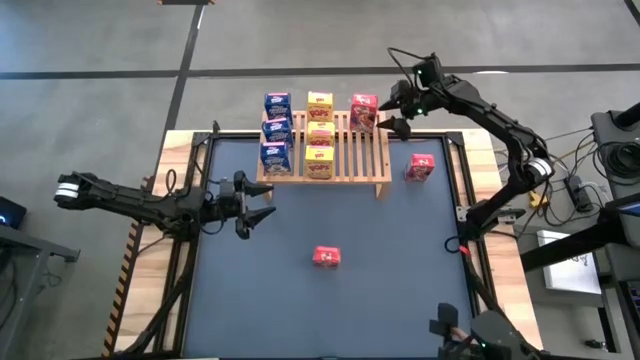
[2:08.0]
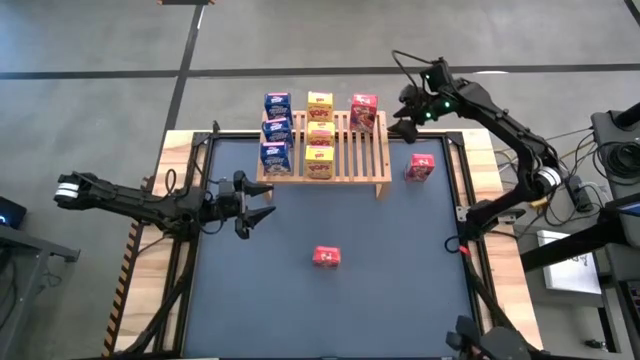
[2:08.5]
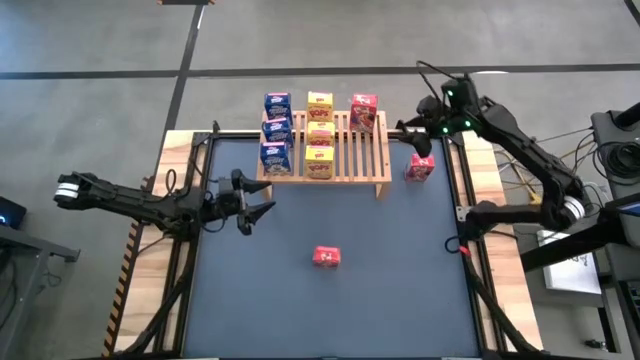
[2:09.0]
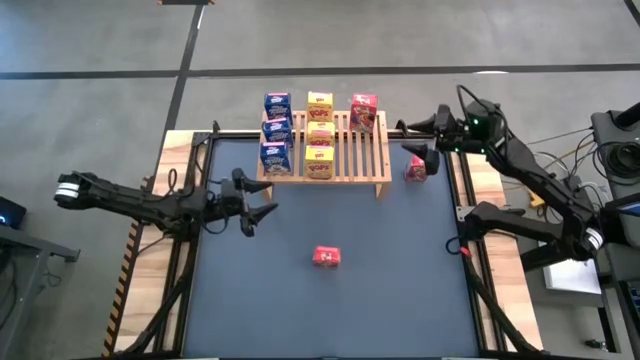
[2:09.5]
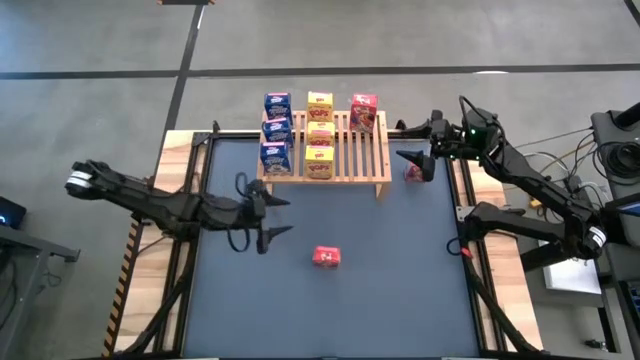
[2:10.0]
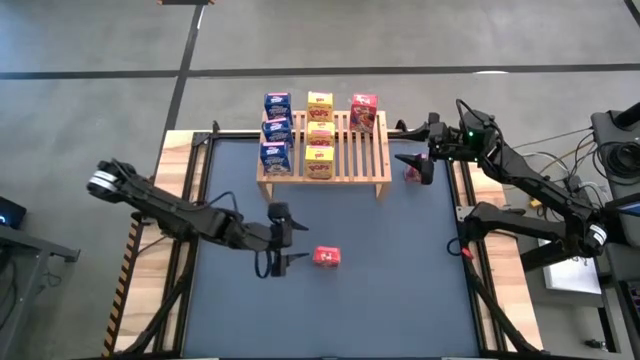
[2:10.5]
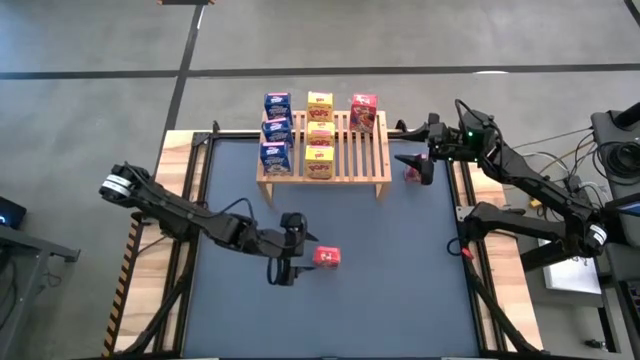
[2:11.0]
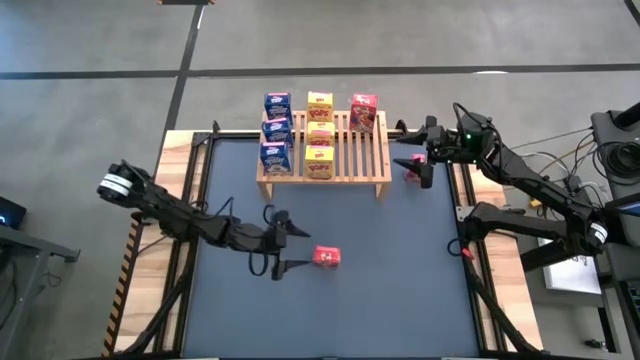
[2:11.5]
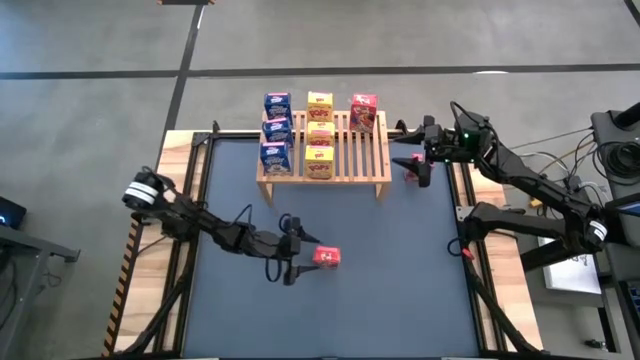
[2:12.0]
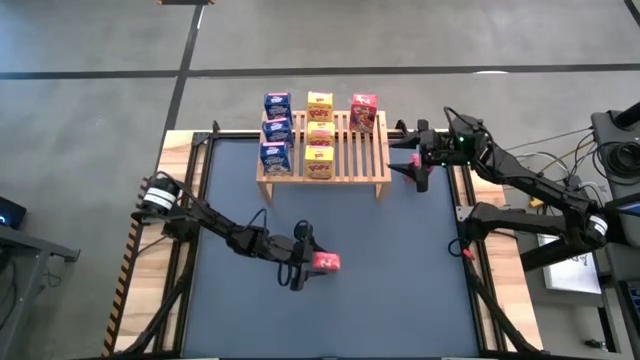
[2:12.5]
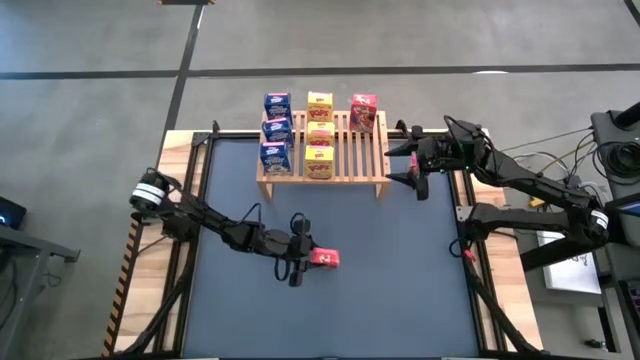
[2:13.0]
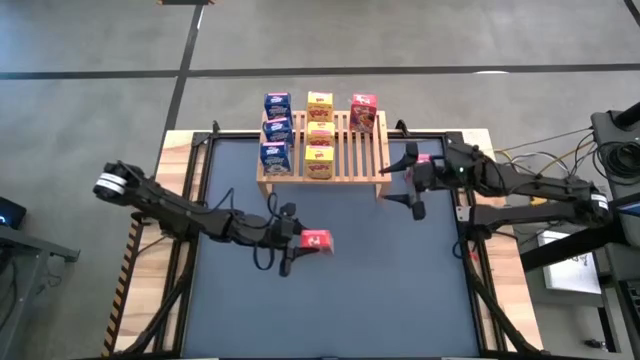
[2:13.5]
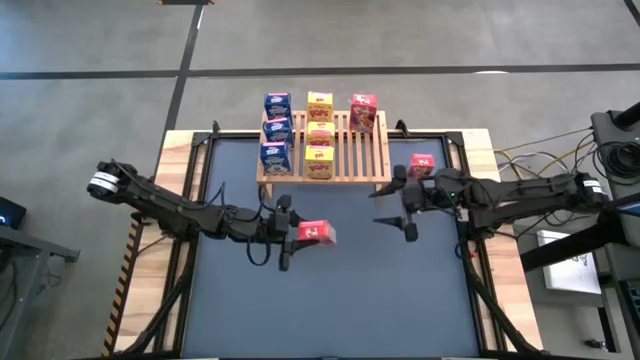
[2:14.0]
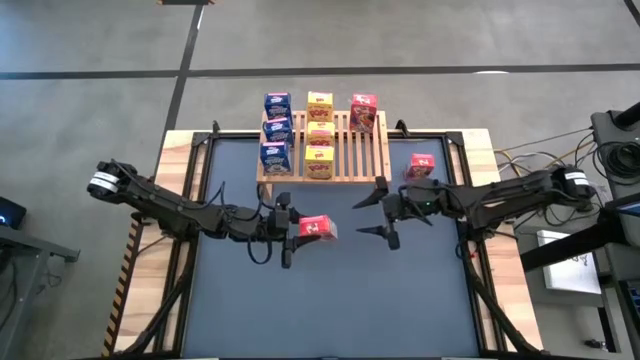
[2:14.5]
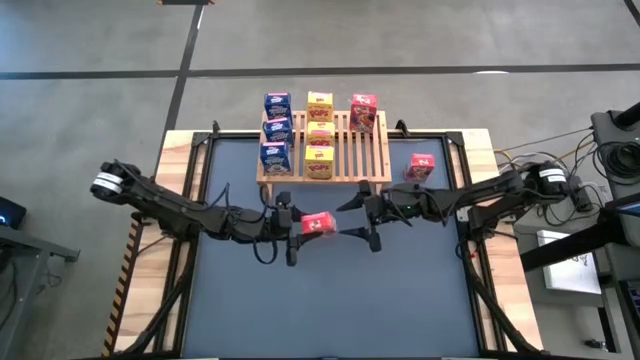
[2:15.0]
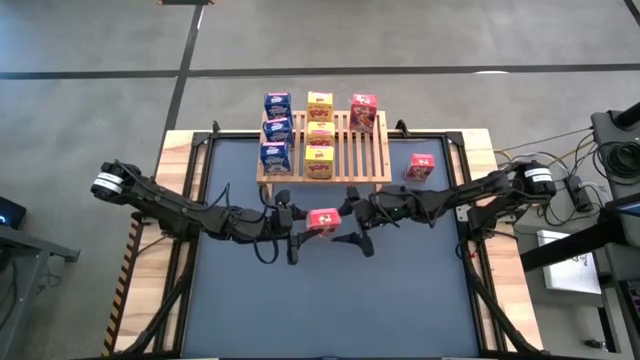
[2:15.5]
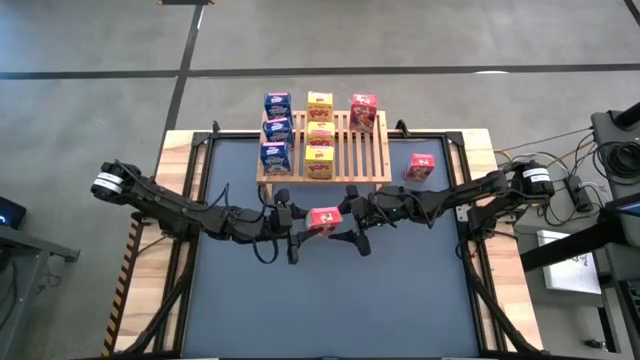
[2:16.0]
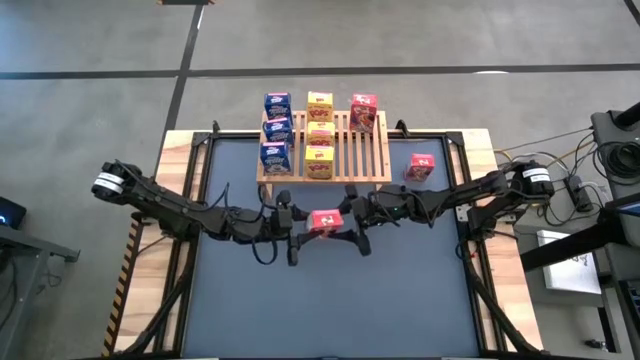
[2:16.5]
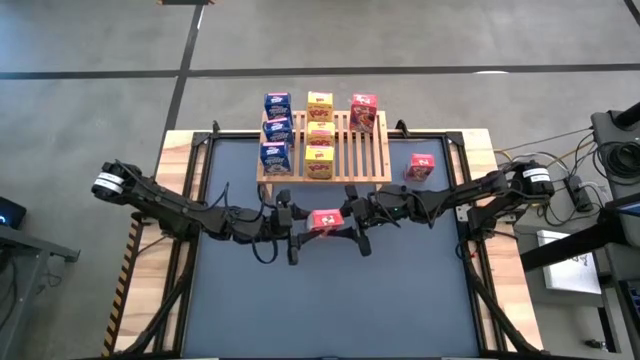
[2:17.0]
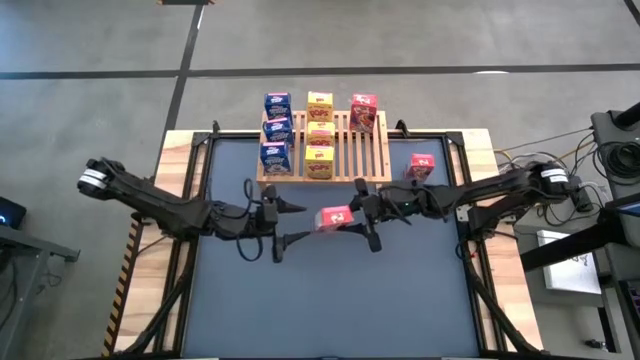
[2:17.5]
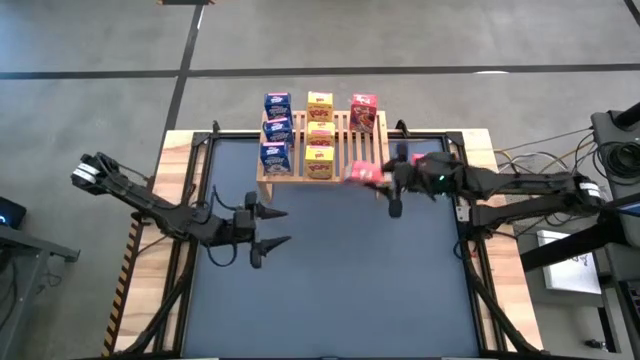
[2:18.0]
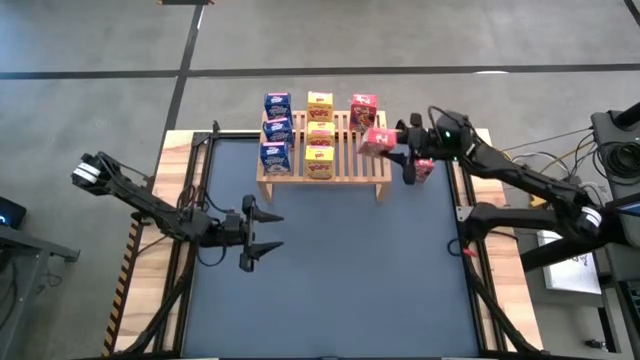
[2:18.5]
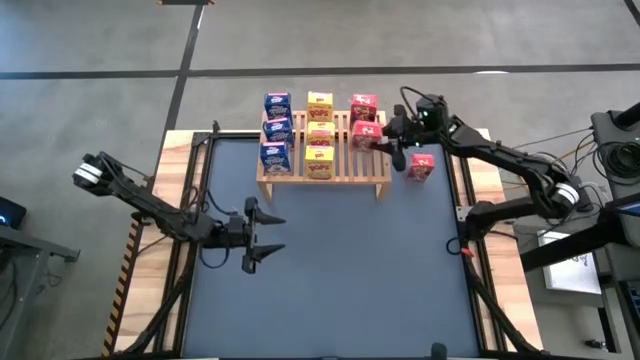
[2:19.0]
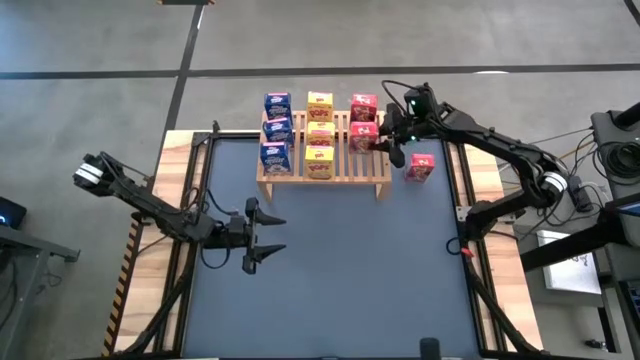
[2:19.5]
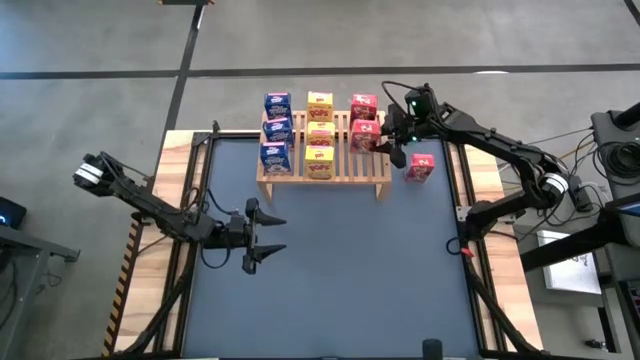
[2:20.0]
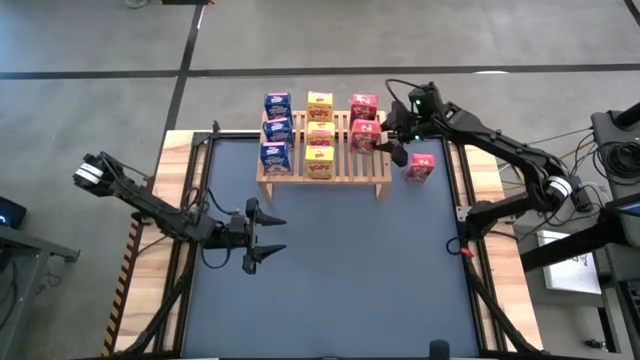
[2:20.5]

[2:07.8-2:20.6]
Task: Stack cereal on shelf
Put the bottom red cereal box on the shelf aligned with the other red cereal box

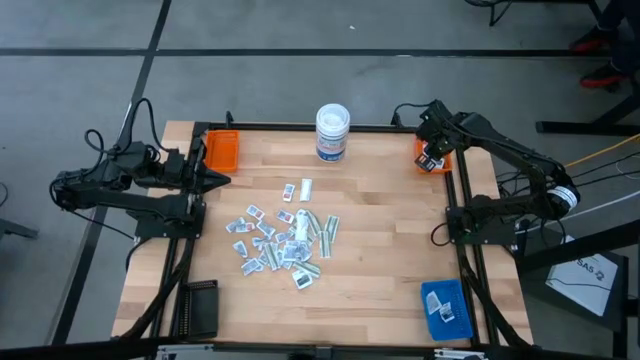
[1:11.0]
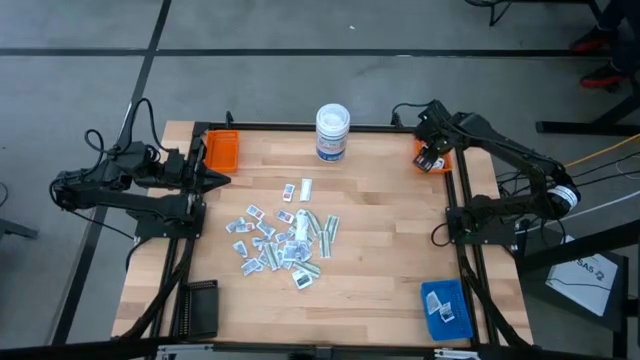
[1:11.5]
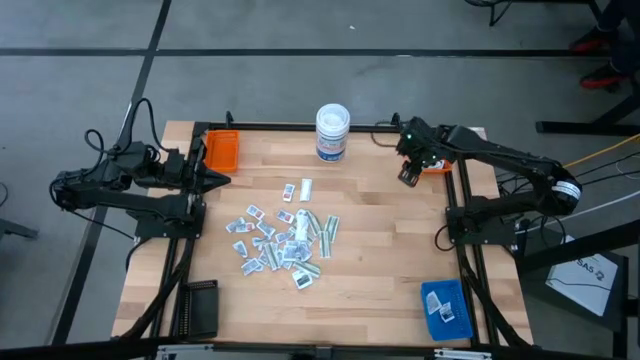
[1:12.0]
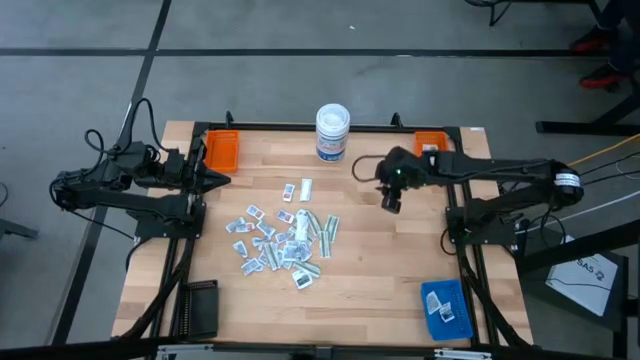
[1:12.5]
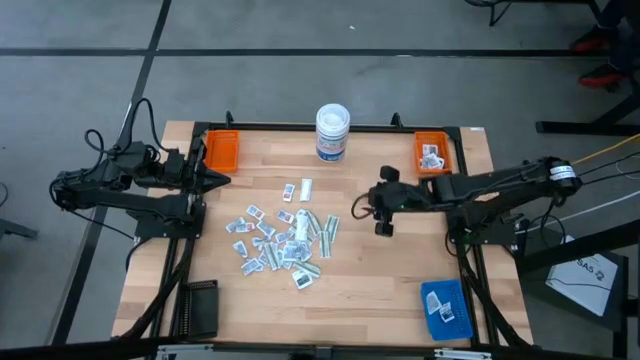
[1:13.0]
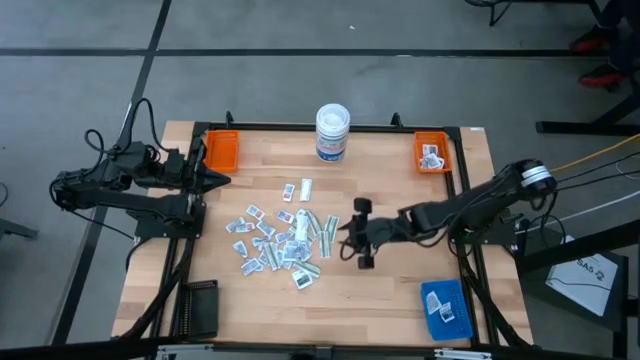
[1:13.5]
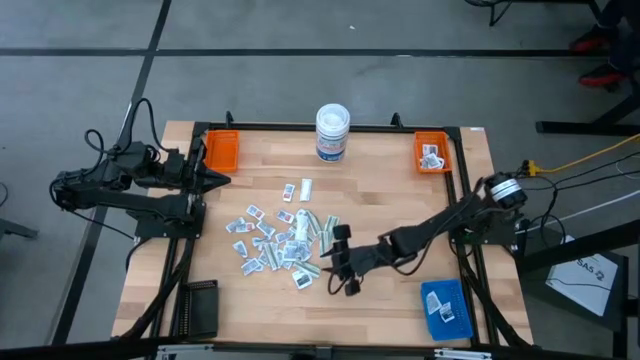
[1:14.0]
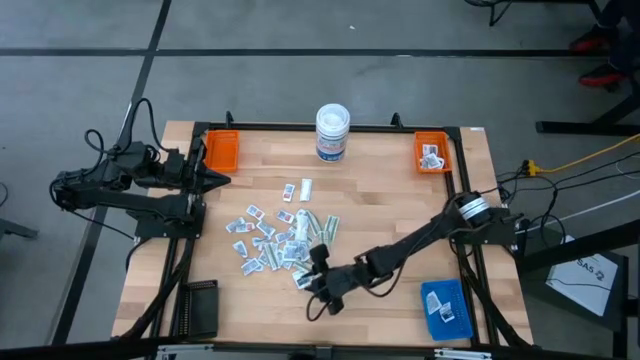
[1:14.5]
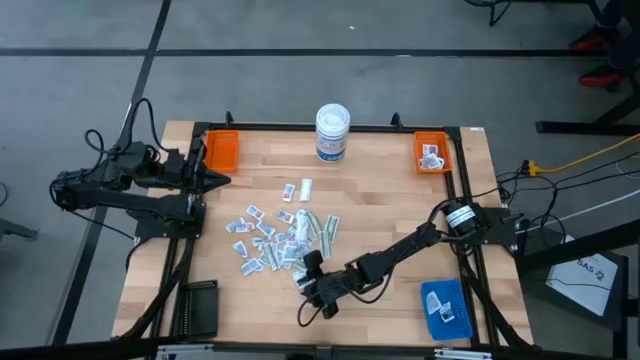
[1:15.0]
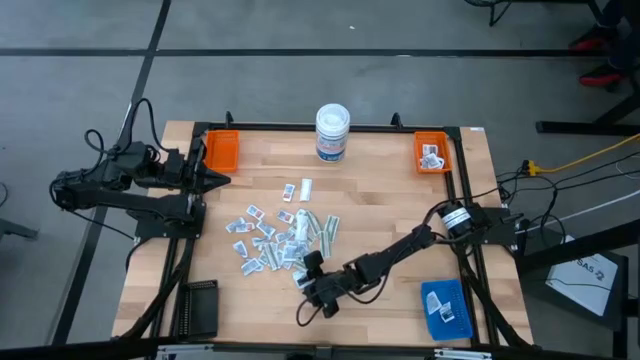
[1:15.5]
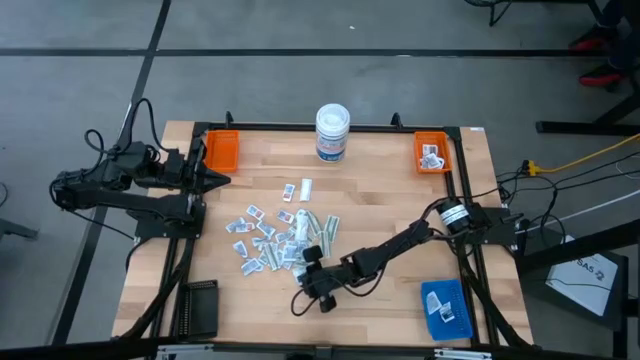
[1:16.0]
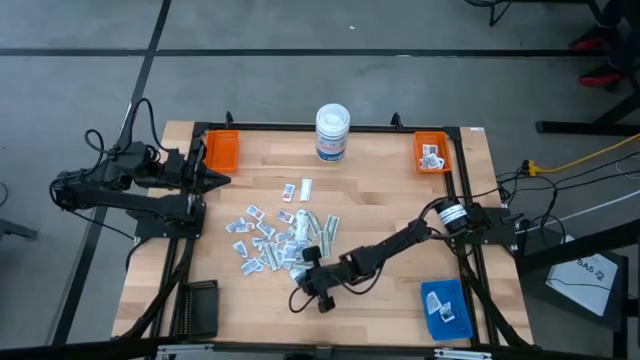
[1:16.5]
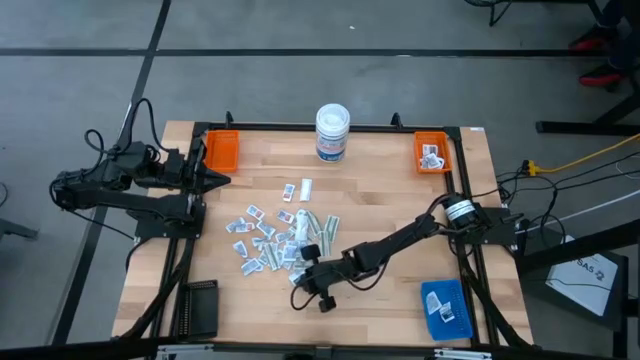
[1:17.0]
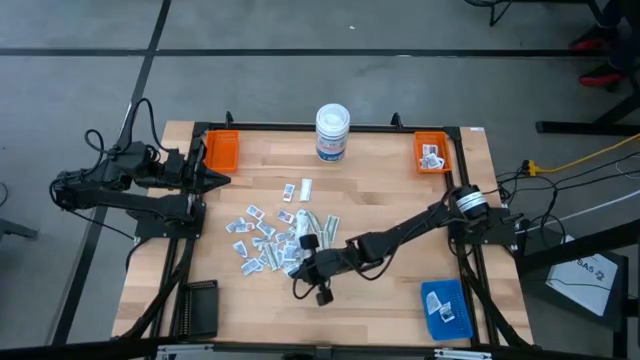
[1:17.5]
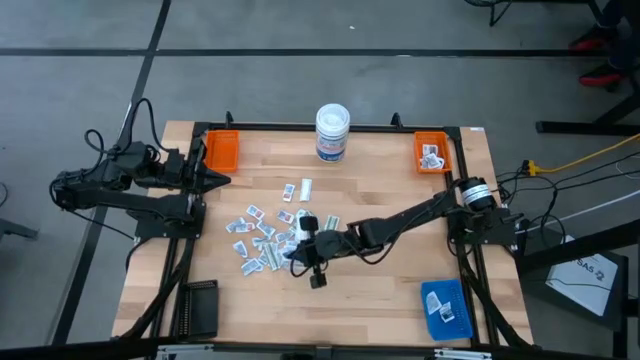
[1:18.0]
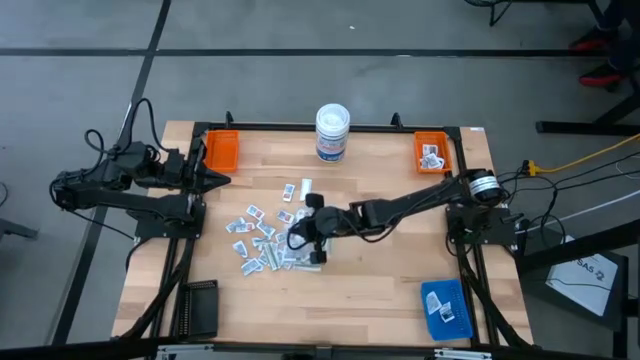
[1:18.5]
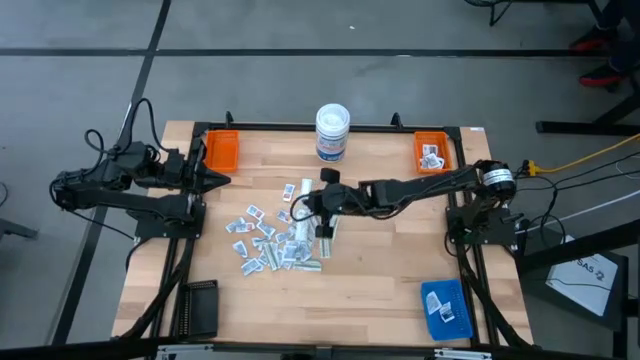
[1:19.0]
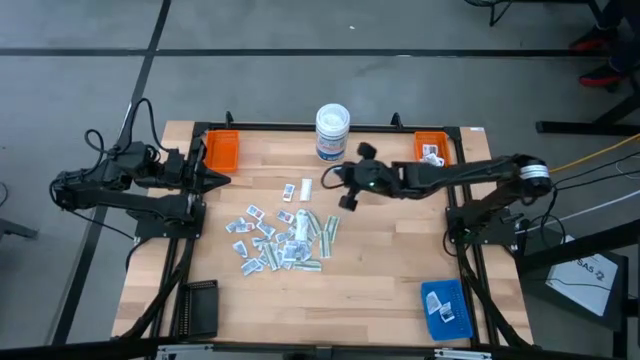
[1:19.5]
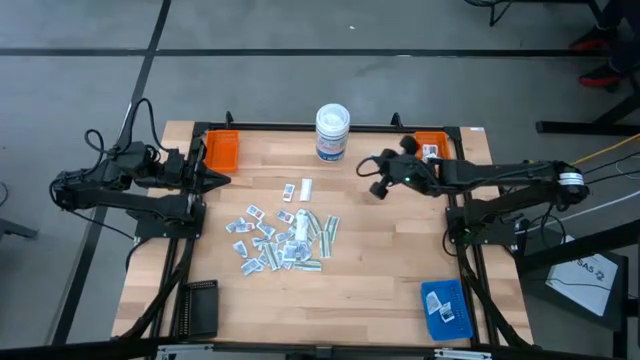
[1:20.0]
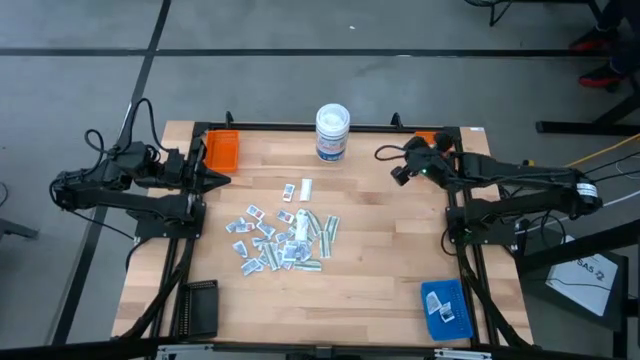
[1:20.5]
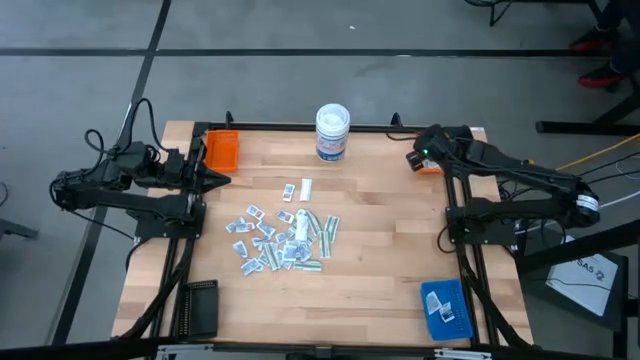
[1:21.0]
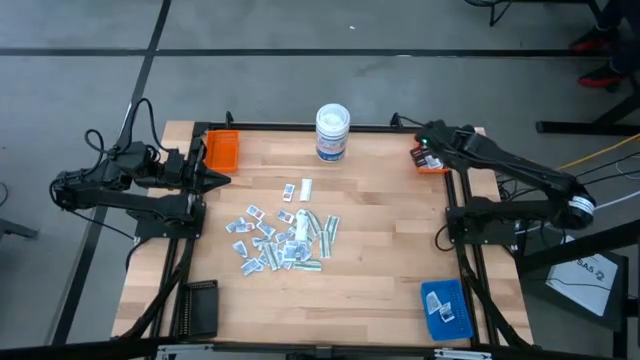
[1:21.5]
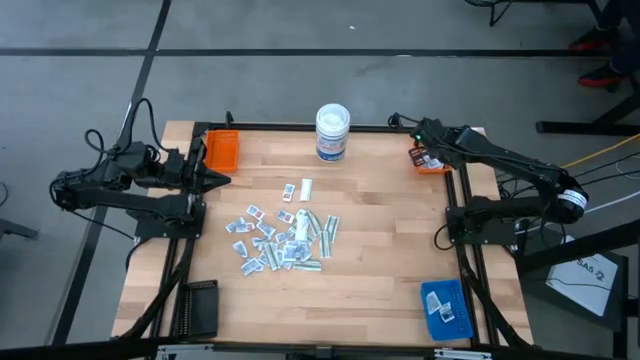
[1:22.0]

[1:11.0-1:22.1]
Task: Pick & Place First Aid Supplies
Put the gray towelette pack into the right orange bin
